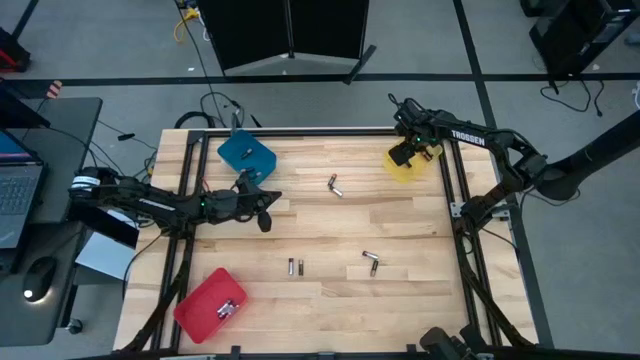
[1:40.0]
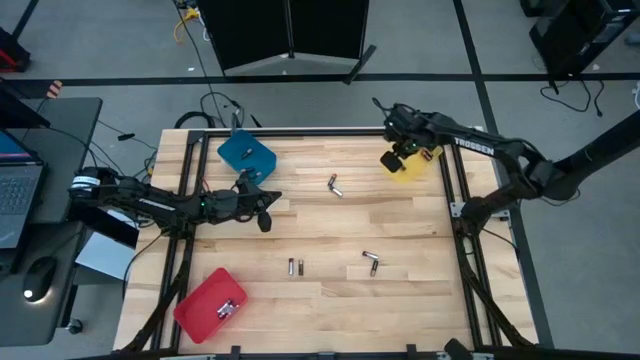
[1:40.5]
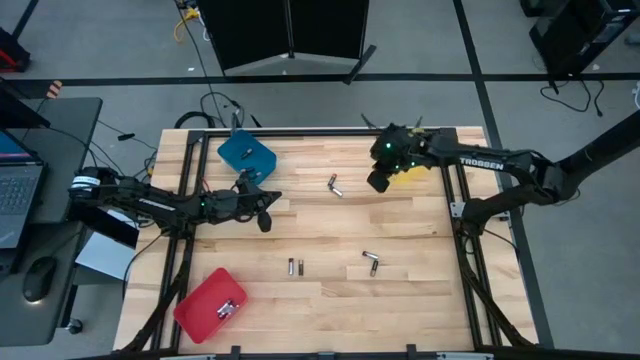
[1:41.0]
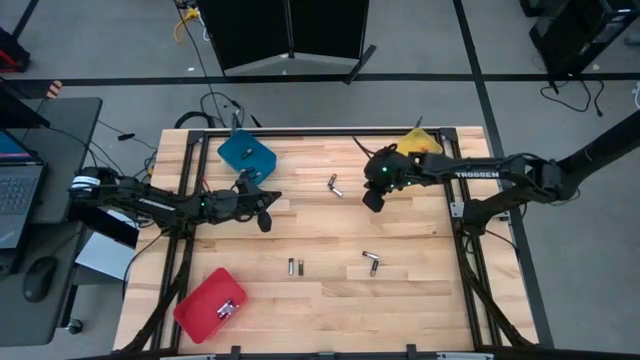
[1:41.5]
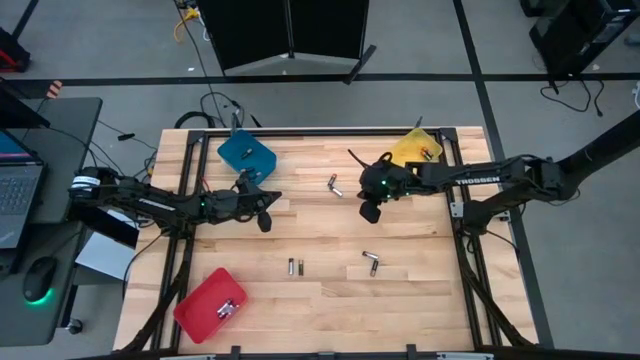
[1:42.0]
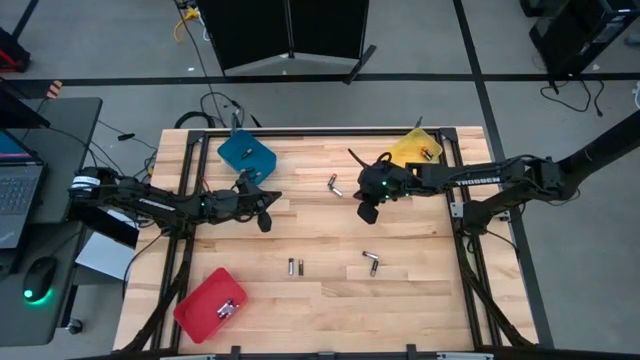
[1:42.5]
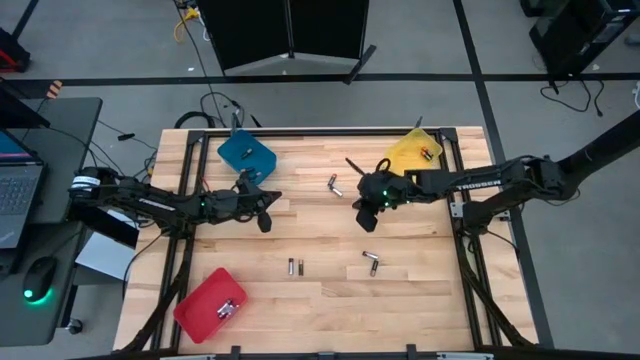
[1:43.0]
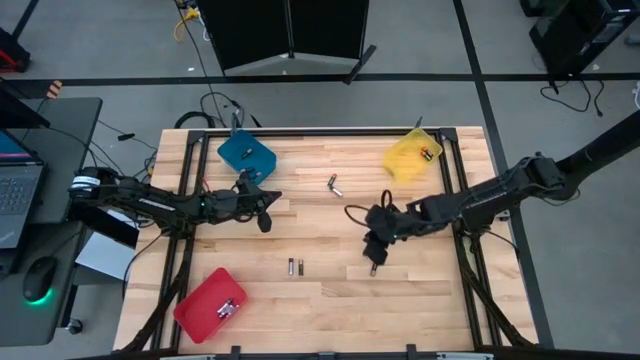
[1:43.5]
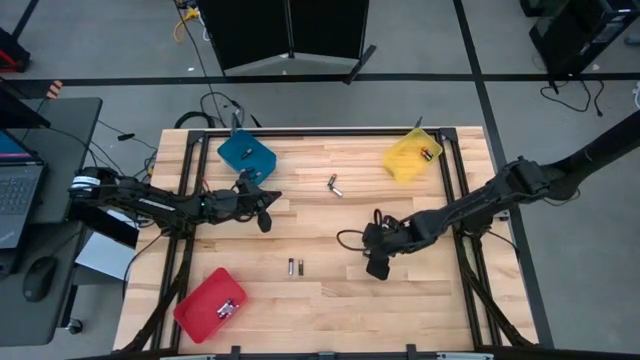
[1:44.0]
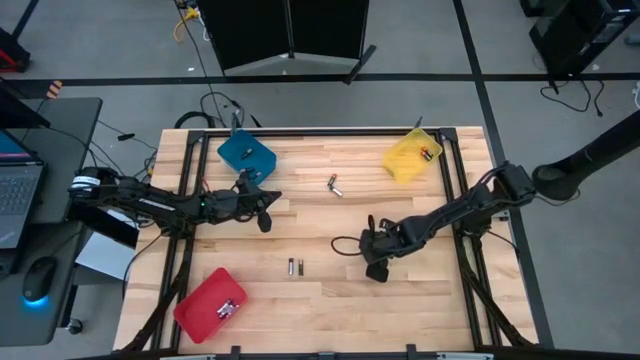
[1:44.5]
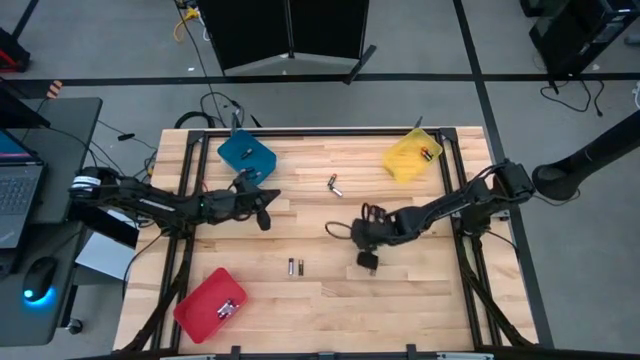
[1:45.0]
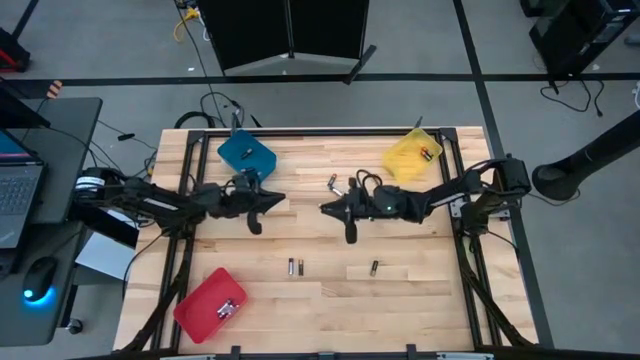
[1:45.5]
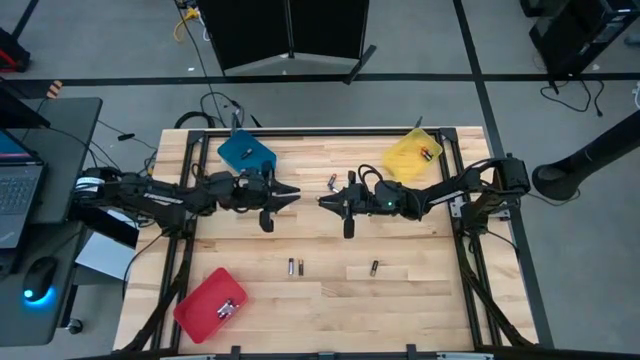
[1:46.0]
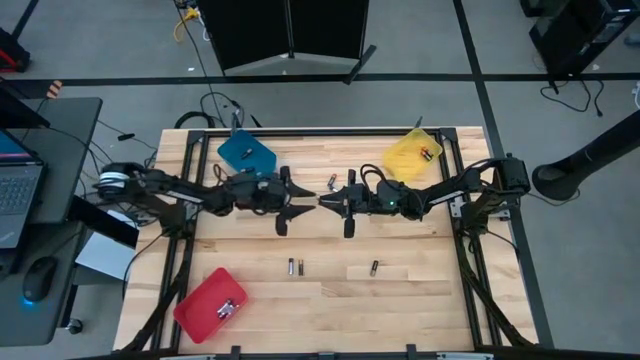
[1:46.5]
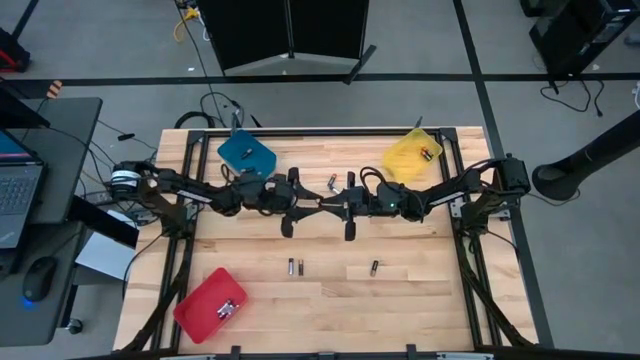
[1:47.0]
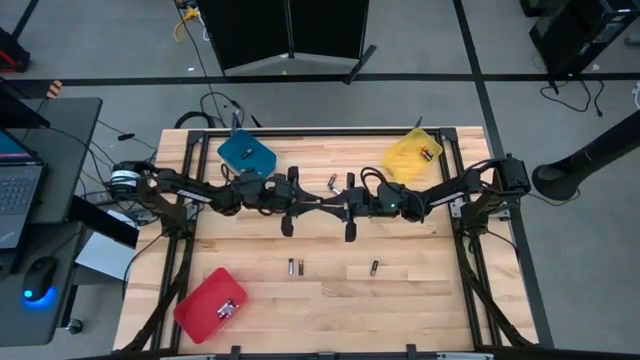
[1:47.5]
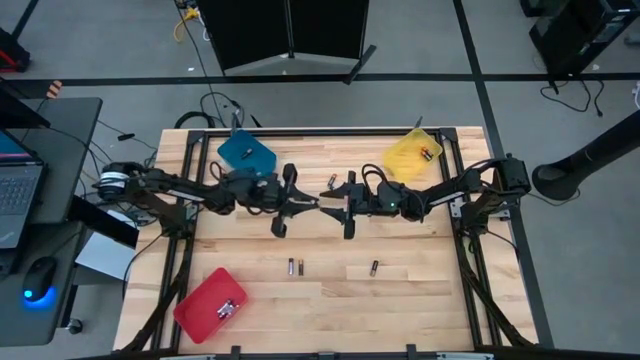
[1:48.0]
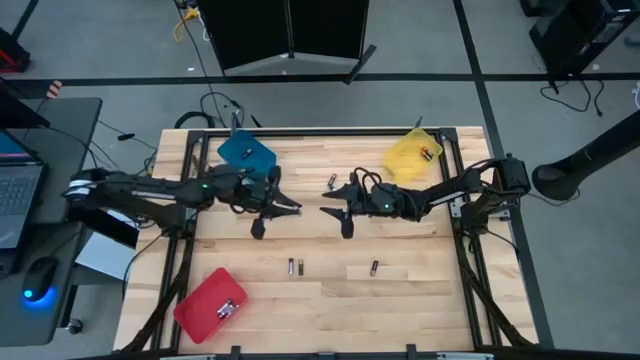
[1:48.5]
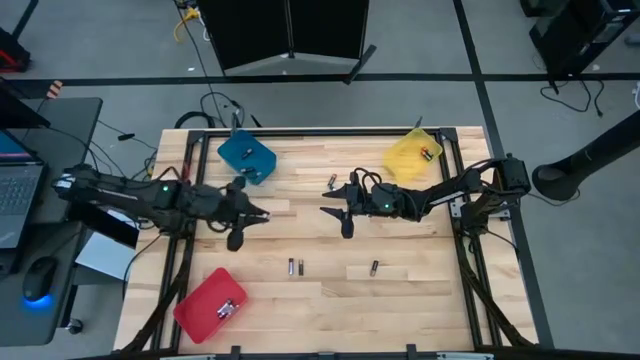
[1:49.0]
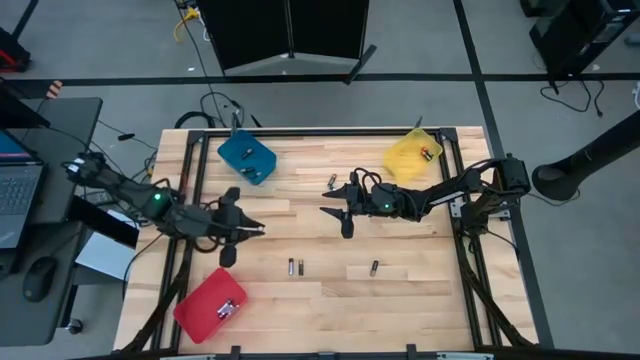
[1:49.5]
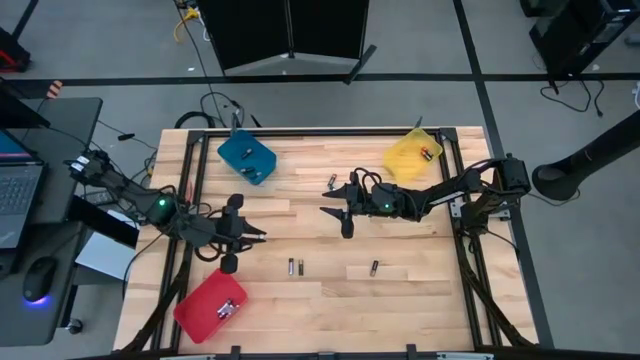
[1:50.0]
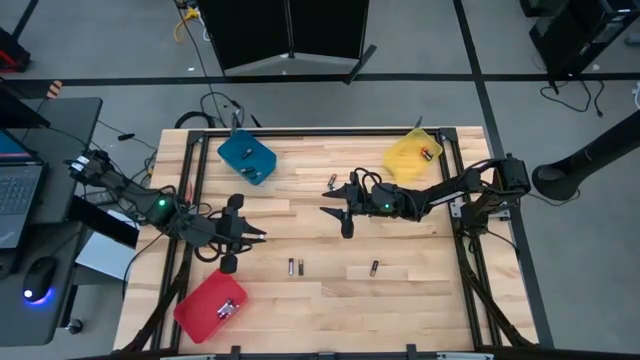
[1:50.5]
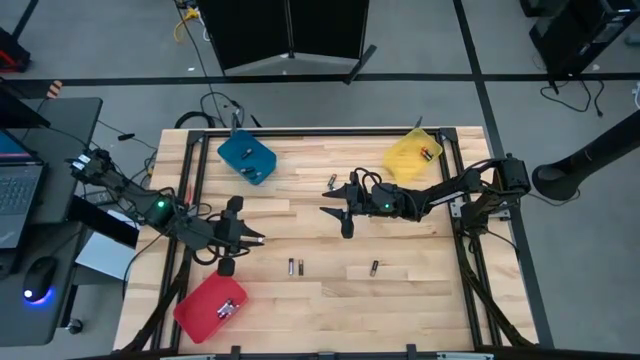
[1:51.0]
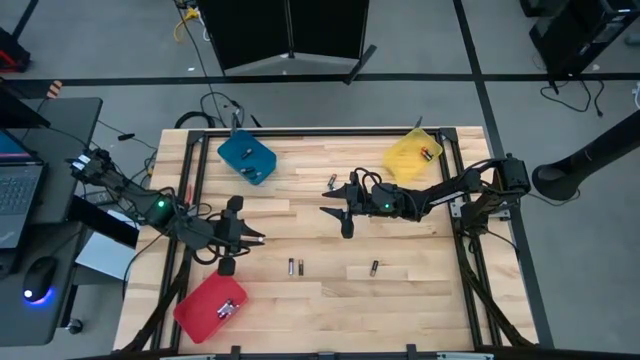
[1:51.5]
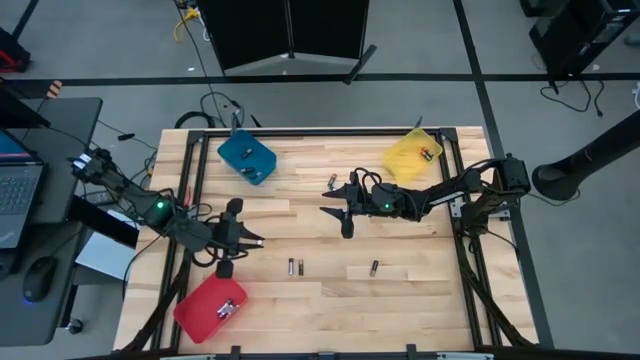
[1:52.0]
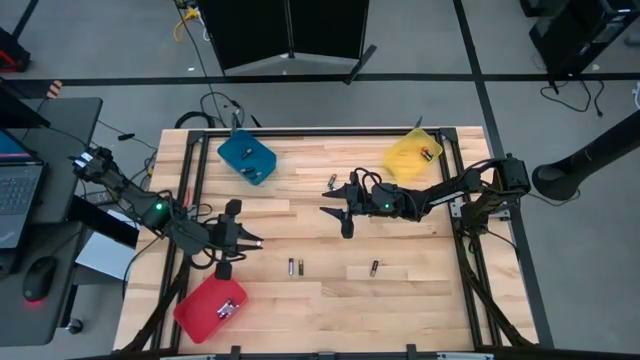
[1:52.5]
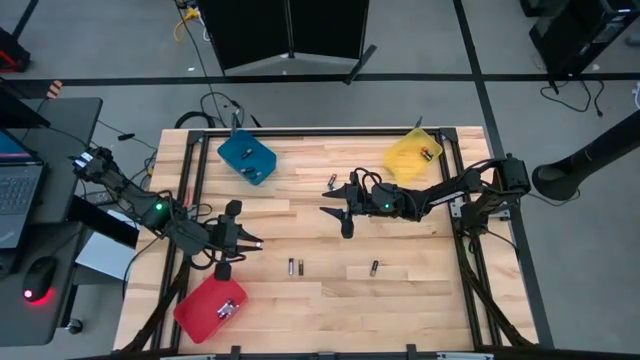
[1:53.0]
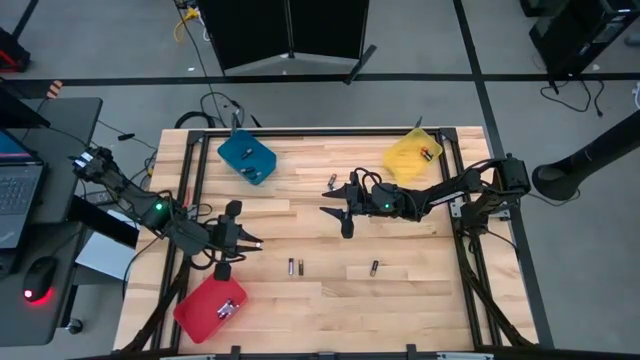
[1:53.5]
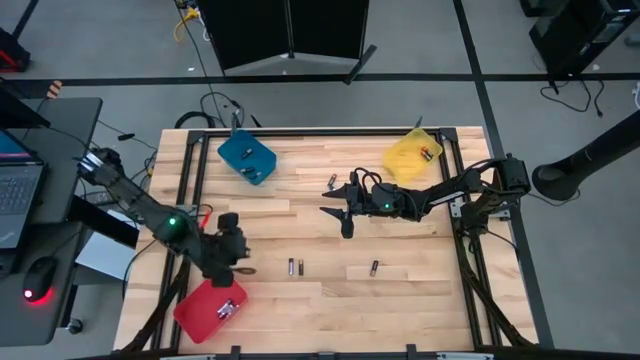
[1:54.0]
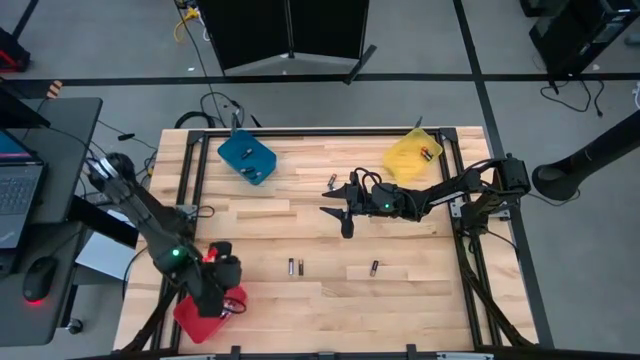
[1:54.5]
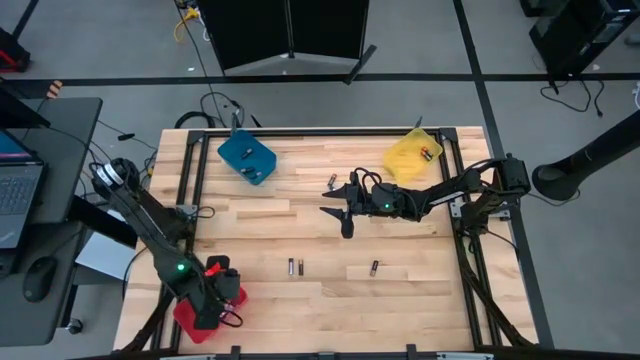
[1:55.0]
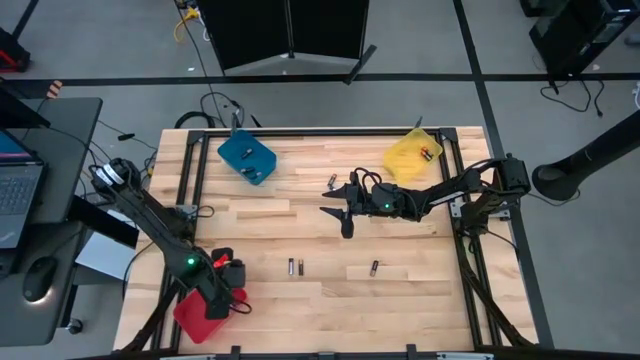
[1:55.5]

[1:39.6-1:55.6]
Task: Sort batteries
Put the bottom right black silver battery into the red bin

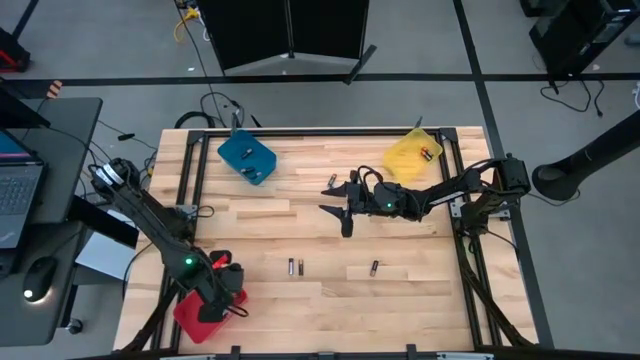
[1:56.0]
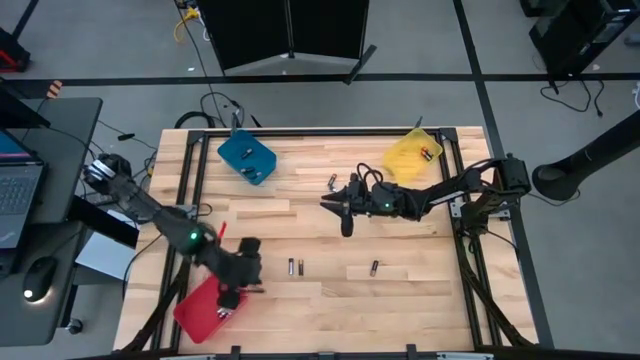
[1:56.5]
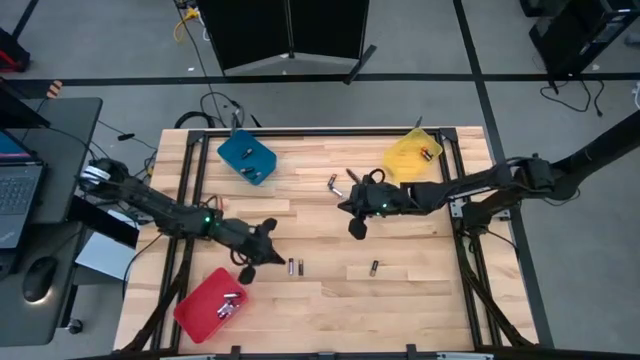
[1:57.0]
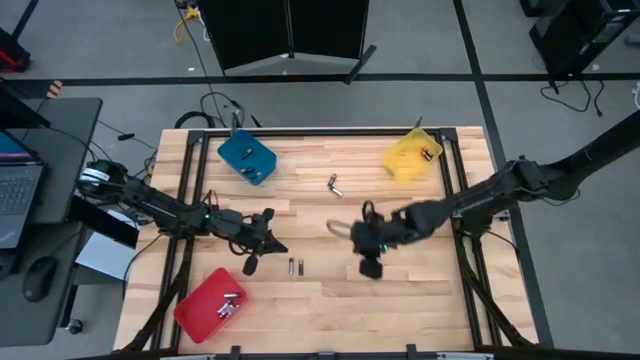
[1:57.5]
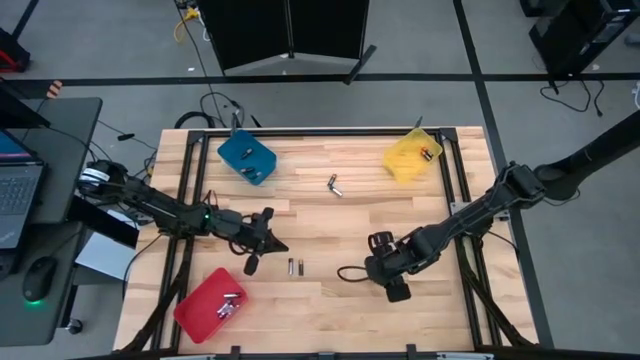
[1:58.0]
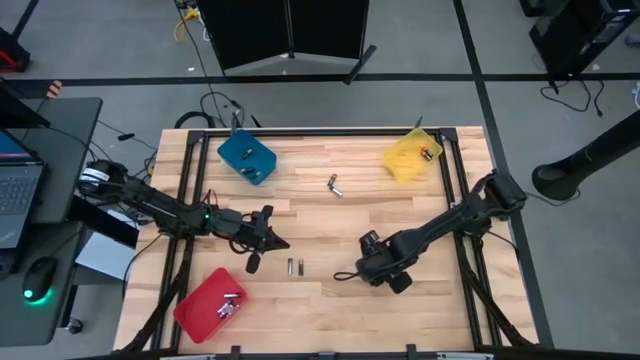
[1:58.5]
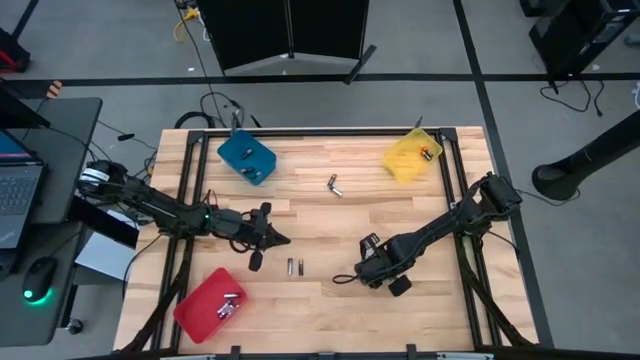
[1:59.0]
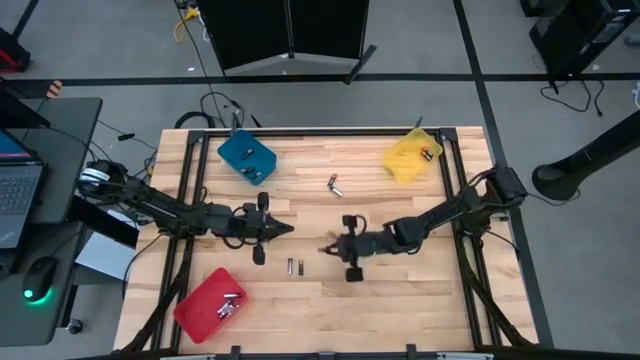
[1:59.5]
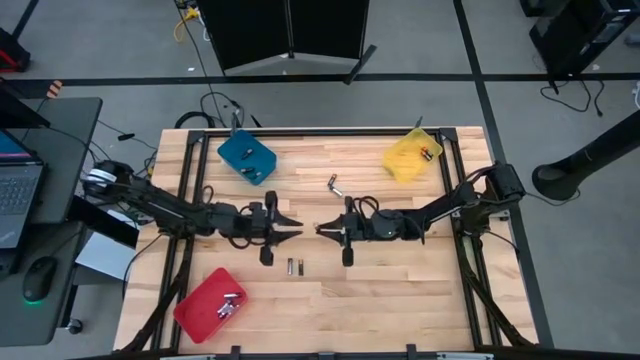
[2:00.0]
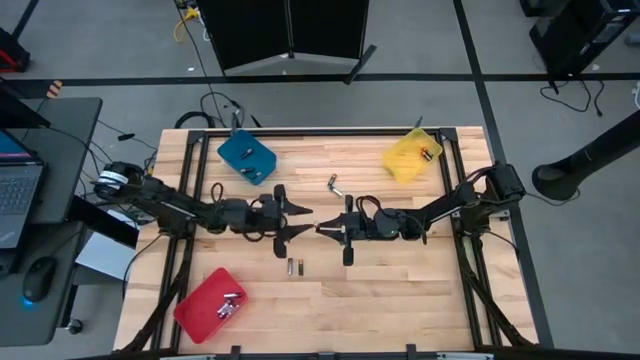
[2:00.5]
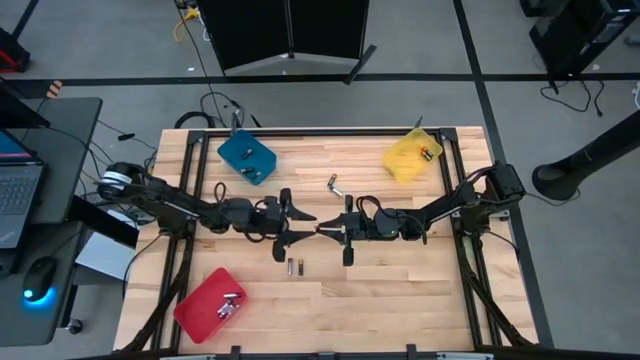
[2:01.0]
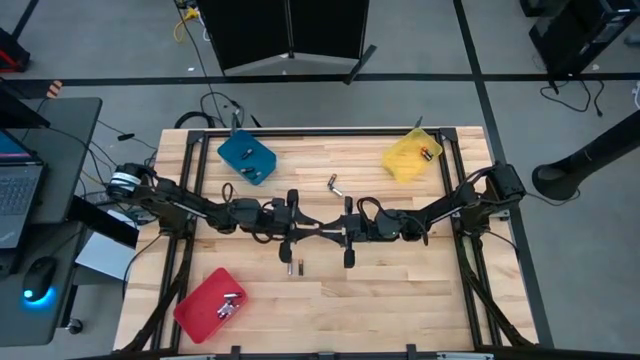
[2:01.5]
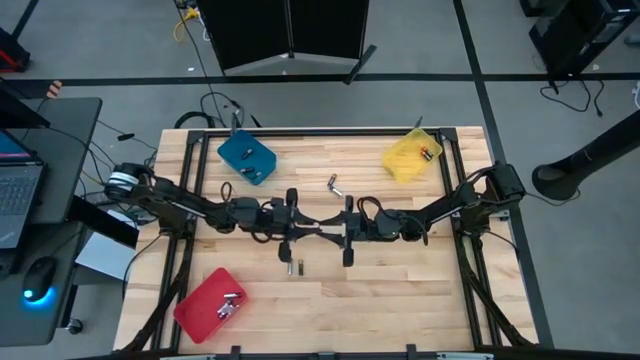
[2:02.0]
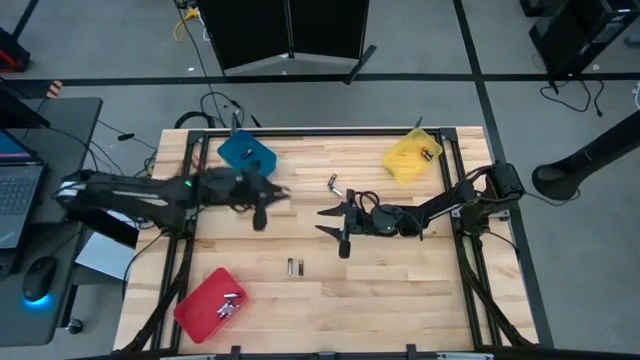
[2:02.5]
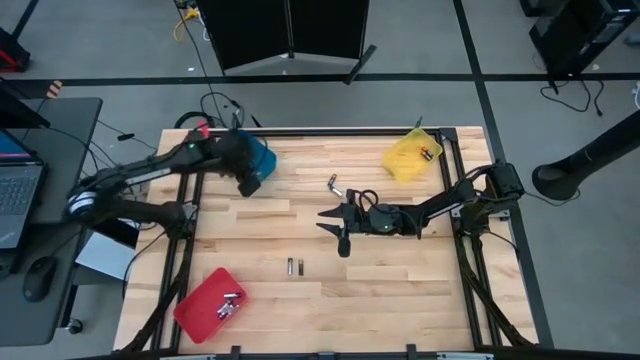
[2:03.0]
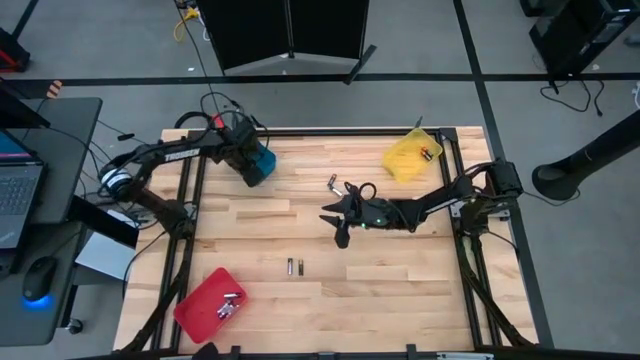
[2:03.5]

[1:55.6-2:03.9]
Put the right black brown battery into the blue bin
